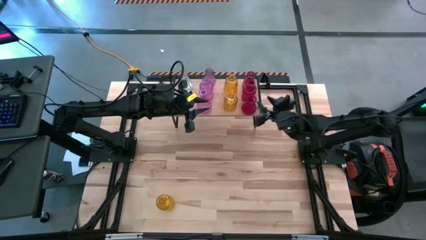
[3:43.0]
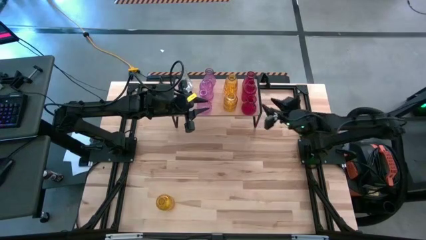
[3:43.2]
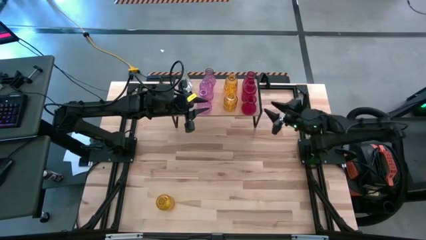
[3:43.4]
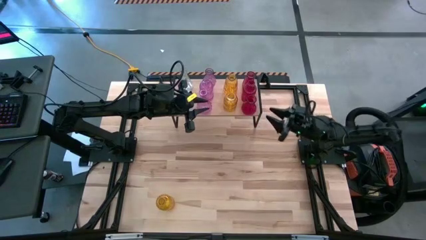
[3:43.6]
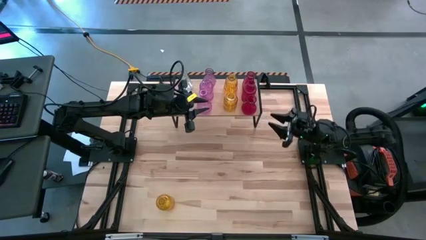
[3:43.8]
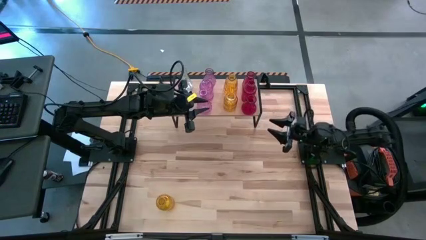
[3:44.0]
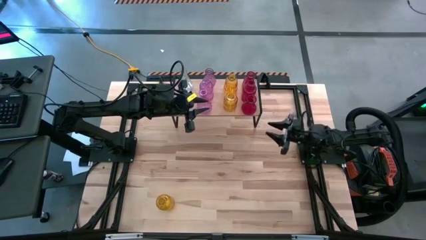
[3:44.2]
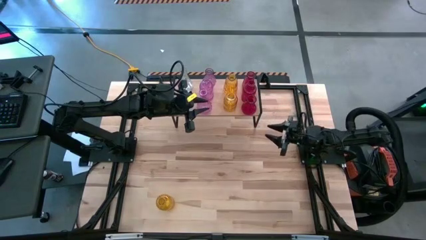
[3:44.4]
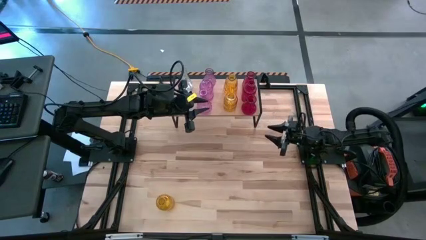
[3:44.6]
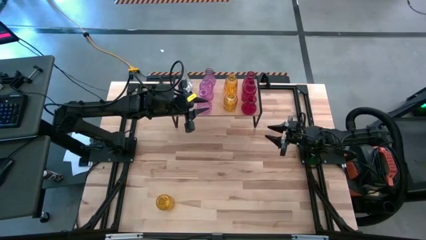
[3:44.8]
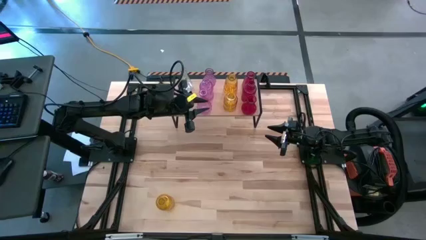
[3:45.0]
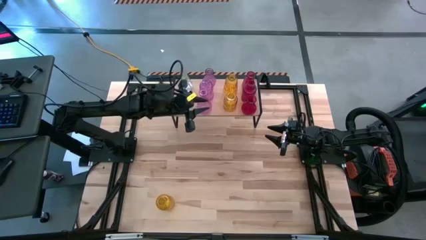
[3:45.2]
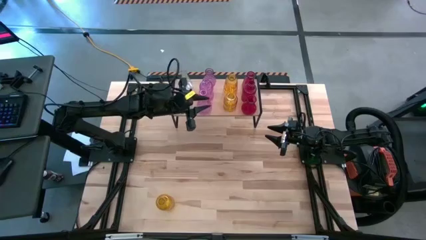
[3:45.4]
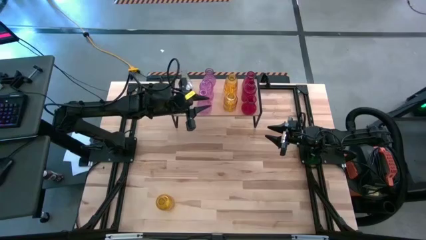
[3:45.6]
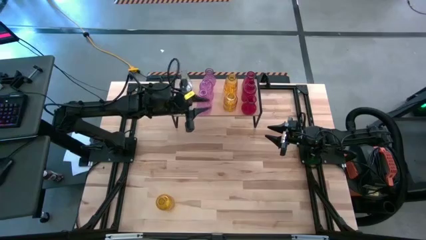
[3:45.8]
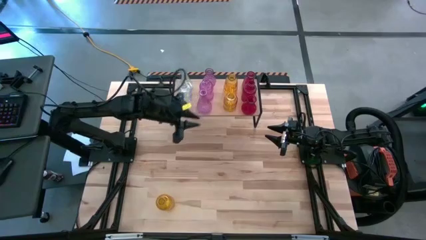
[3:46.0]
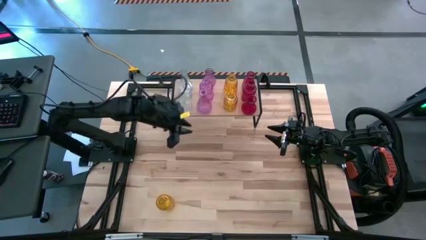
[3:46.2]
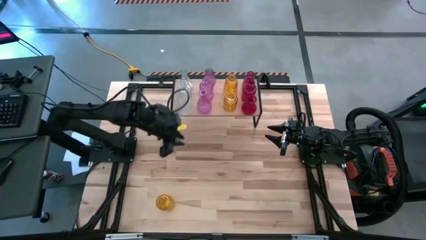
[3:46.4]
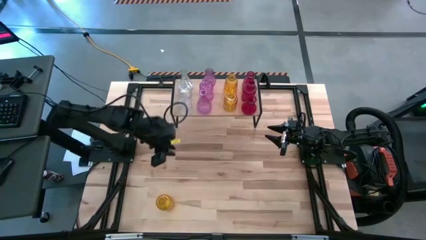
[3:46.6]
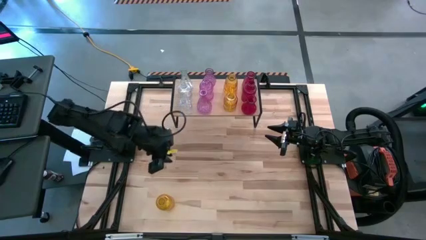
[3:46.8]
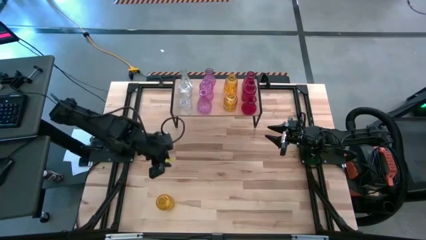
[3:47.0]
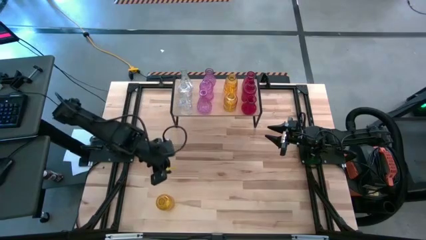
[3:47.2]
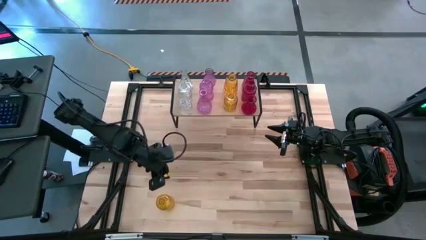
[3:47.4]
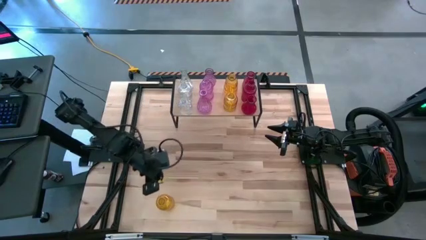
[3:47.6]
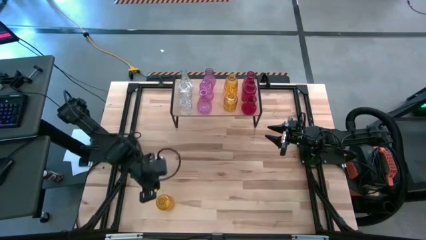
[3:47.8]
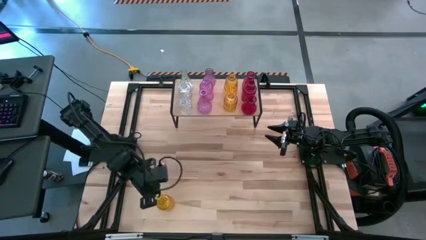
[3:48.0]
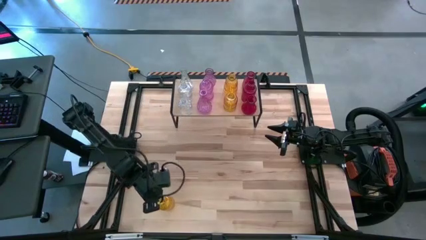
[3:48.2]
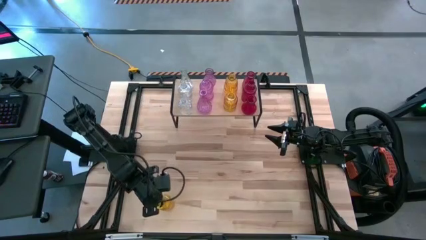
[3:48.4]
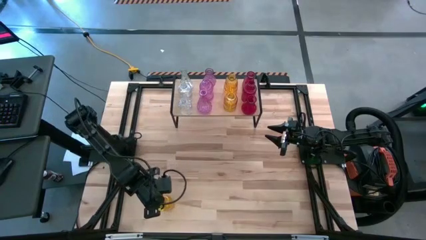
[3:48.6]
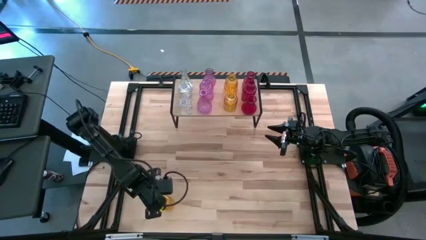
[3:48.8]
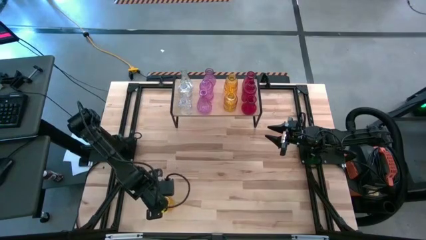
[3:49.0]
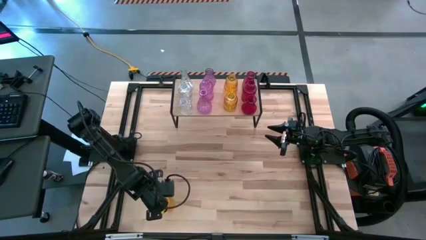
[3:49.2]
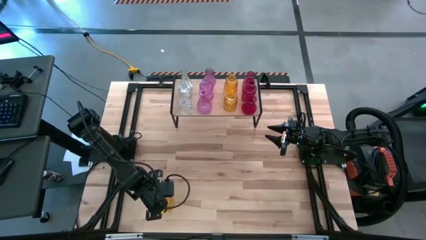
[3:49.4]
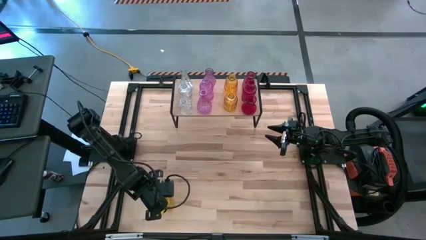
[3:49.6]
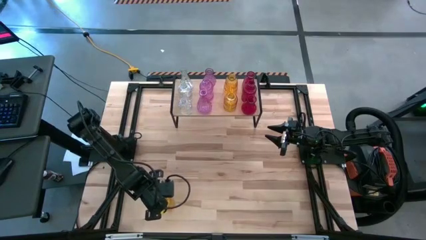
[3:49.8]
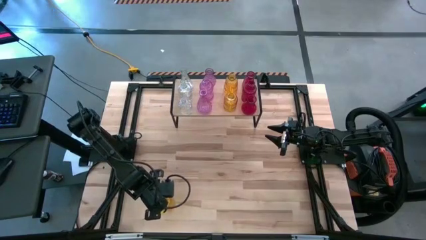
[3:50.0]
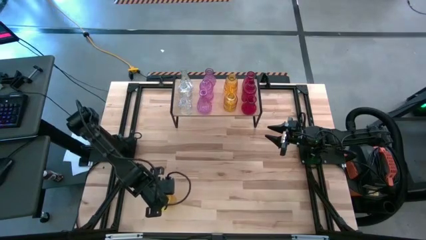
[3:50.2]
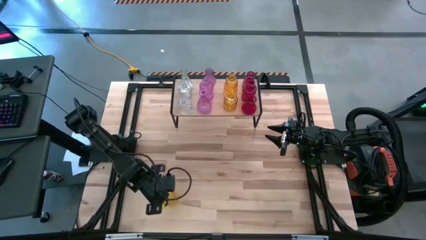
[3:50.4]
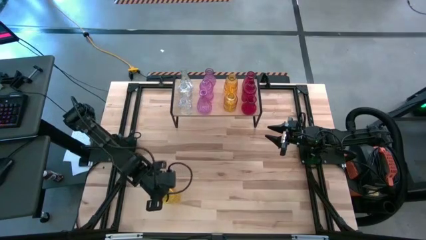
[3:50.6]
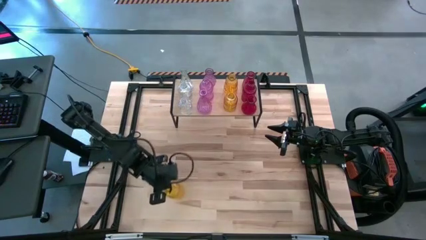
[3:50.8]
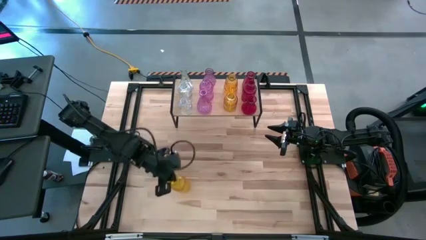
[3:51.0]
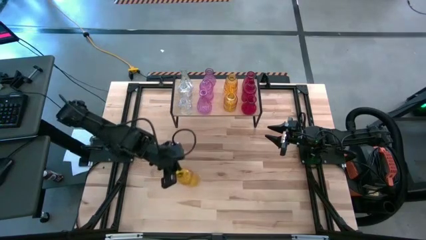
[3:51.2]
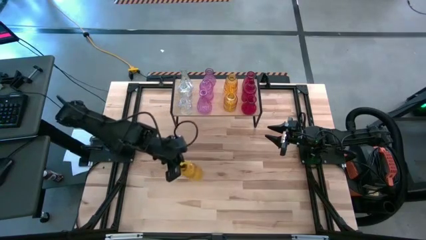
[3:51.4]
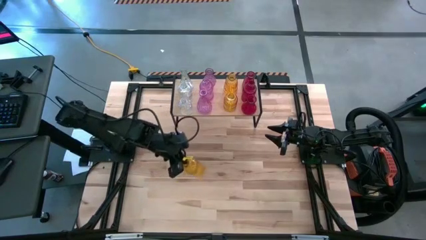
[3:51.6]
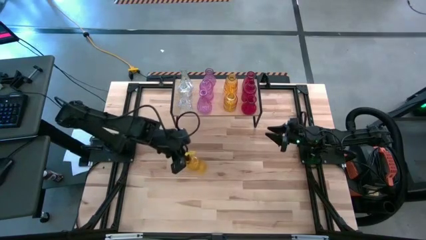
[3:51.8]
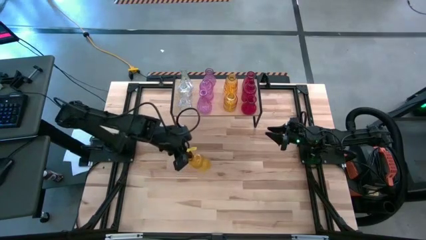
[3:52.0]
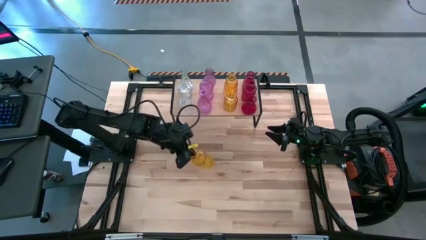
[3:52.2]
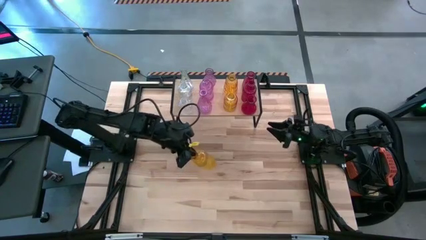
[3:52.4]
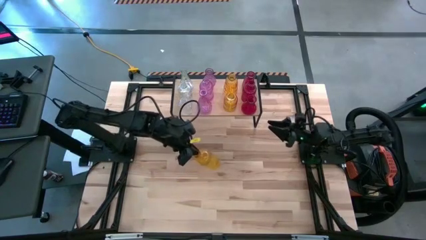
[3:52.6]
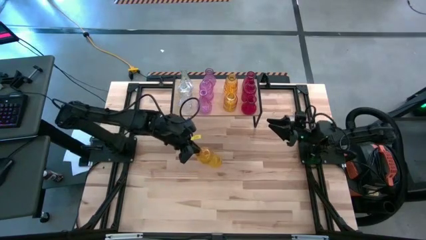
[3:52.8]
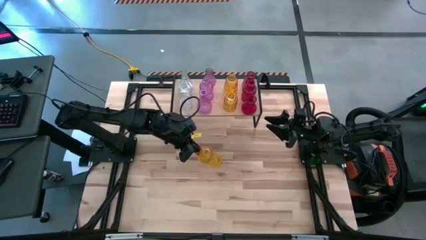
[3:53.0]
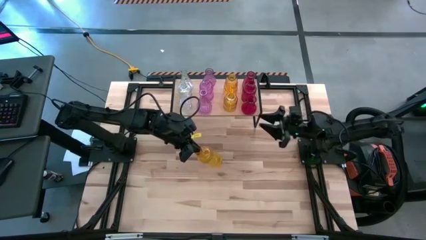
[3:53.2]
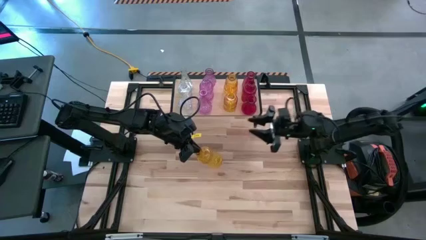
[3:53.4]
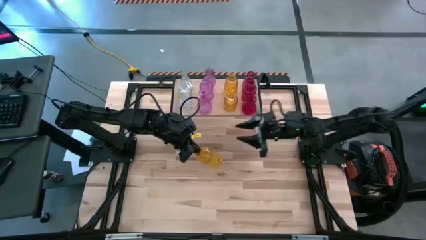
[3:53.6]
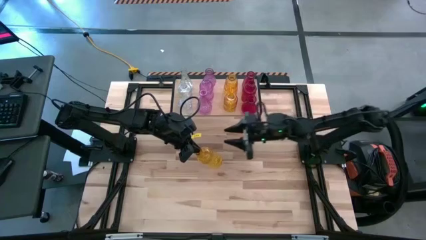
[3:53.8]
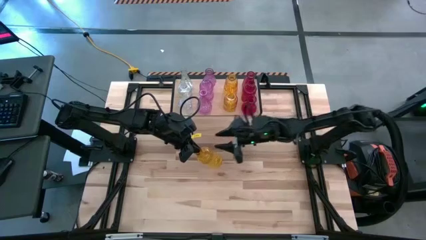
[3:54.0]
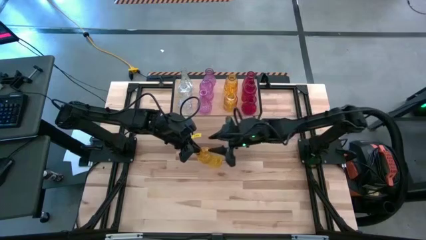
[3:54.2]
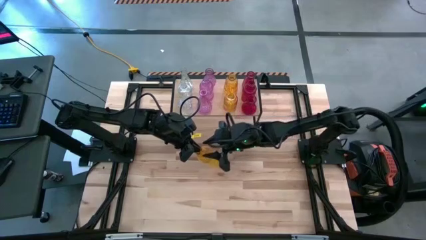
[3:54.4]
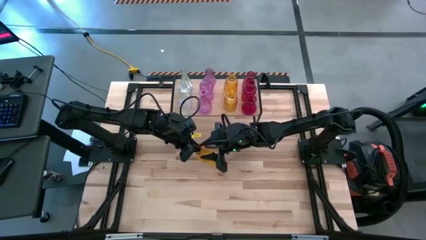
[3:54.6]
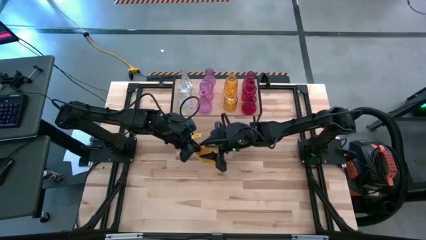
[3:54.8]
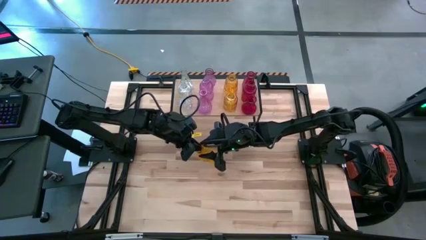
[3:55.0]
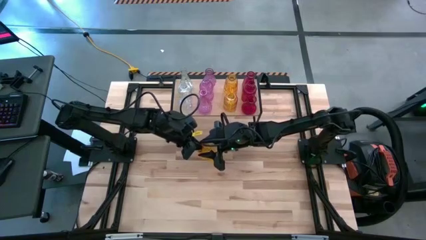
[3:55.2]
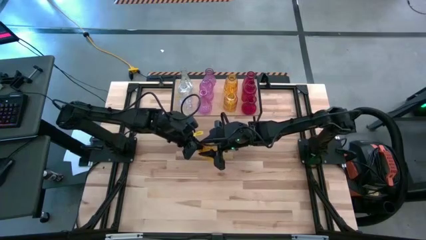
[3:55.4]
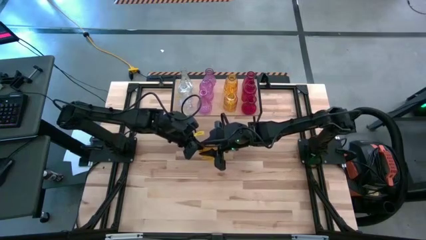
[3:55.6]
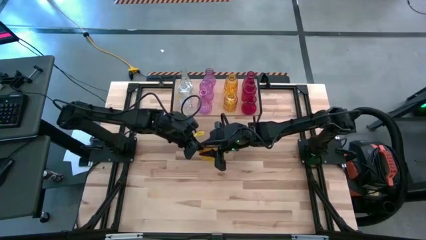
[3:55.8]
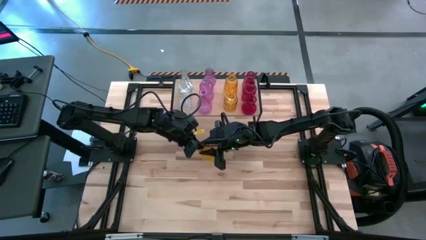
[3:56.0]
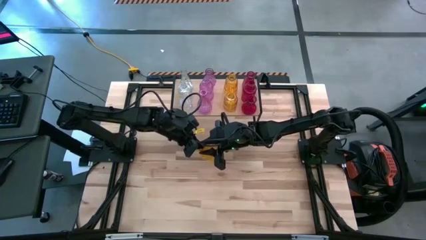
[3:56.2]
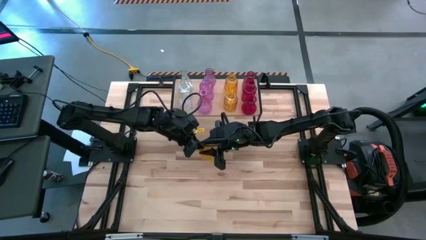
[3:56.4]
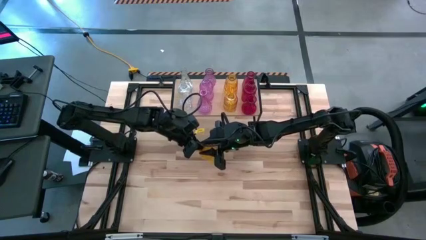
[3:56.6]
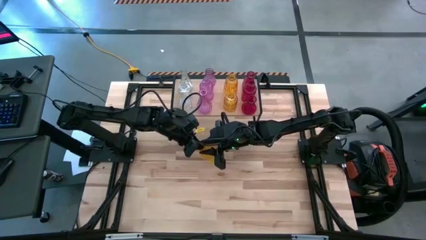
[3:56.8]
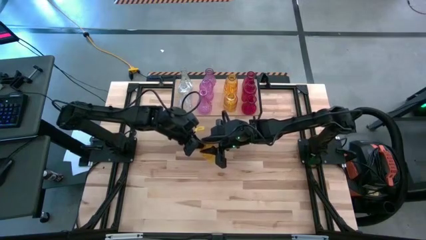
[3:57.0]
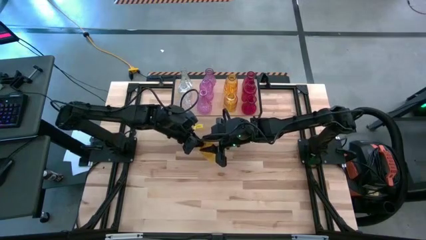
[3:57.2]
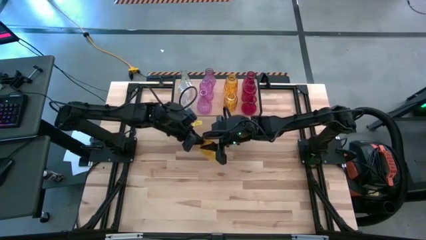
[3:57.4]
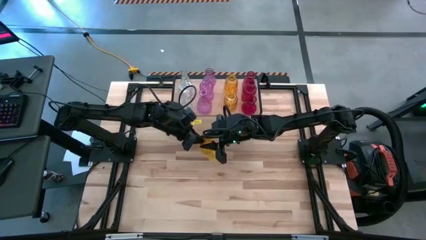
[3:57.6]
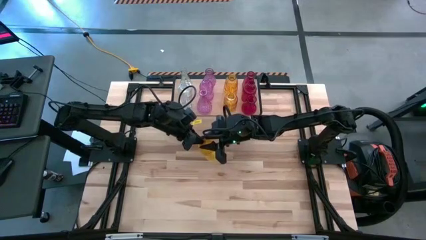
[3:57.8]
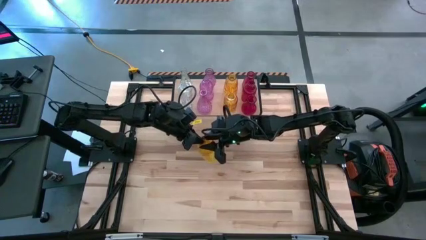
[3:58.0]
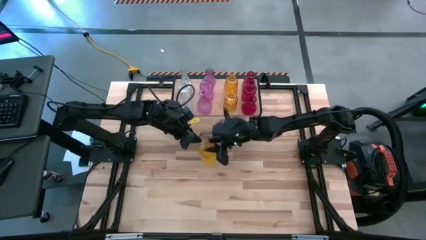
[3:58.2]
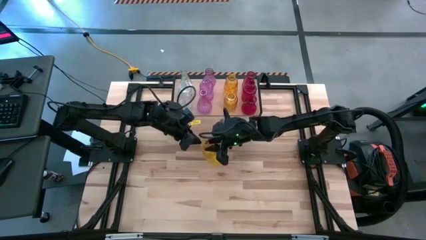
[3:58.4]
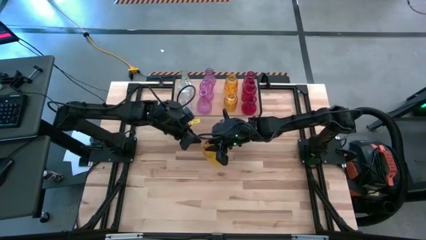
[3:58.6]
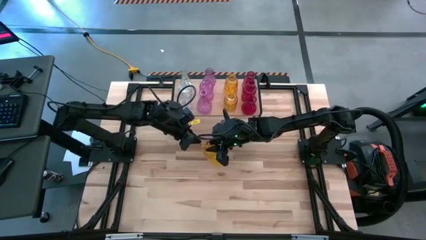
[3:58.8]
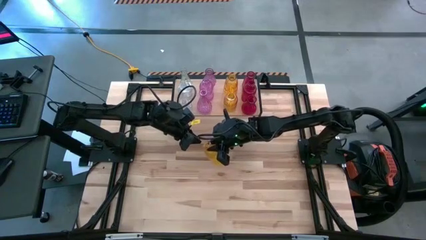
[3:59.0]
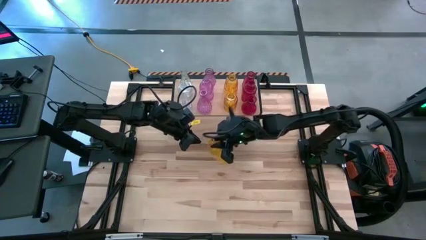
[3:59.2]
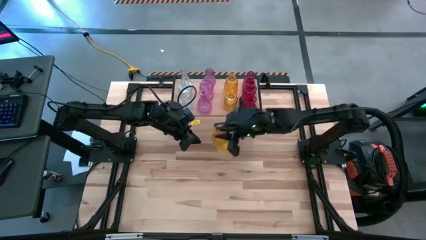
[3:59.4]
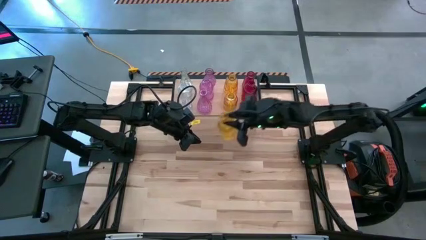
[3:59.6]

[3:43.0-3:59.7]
Task: sort vases onto shelf
Put the yellow vase on the shelf aligned with the other yellow vase
